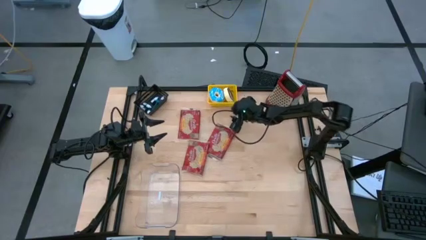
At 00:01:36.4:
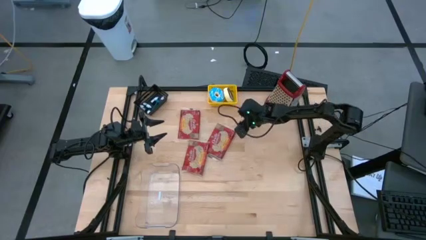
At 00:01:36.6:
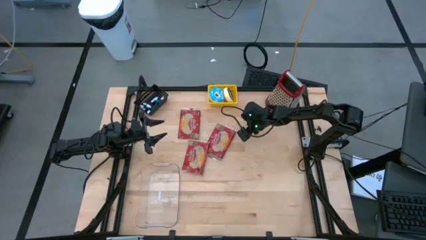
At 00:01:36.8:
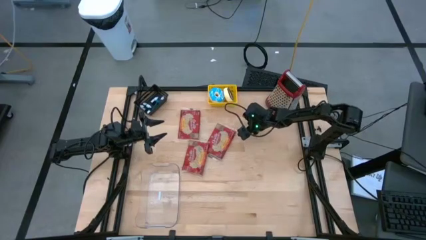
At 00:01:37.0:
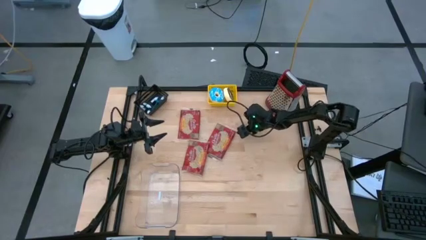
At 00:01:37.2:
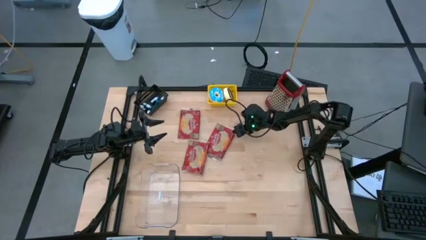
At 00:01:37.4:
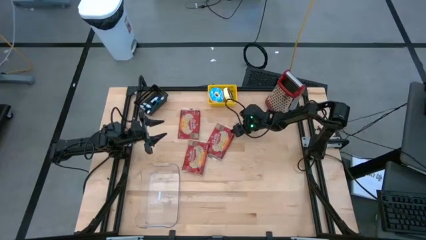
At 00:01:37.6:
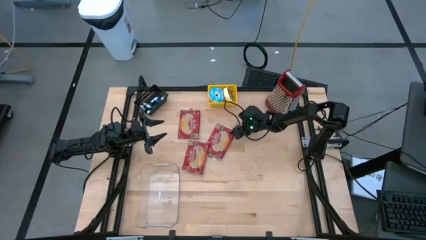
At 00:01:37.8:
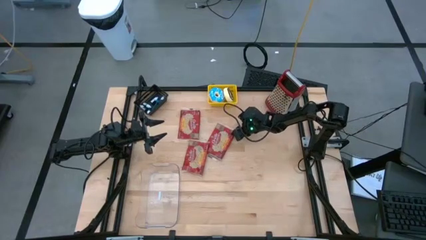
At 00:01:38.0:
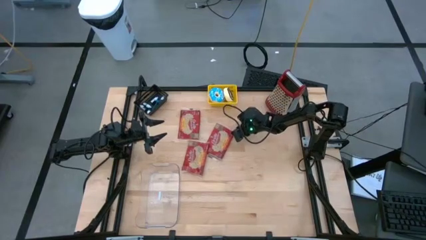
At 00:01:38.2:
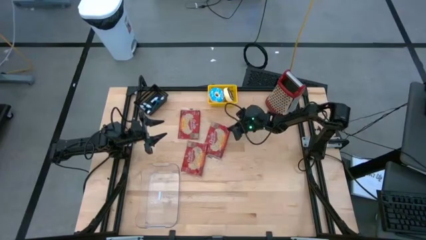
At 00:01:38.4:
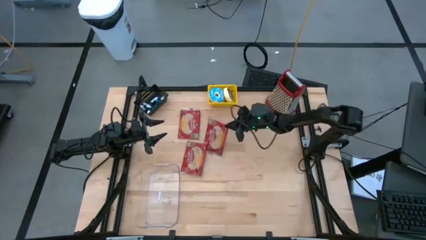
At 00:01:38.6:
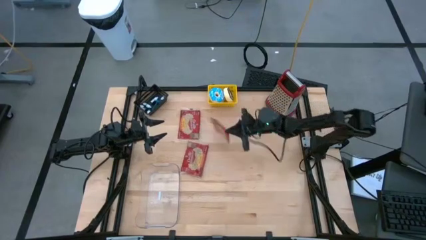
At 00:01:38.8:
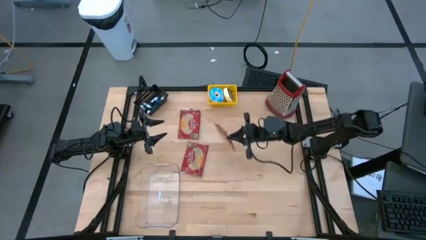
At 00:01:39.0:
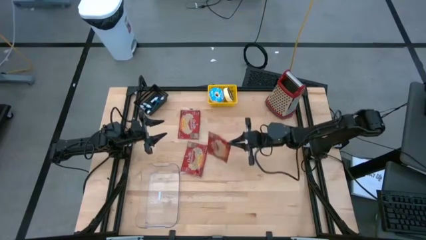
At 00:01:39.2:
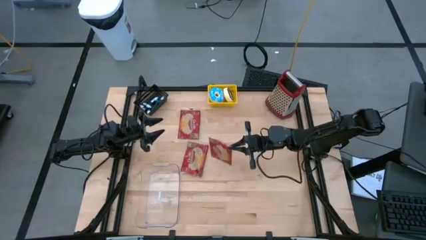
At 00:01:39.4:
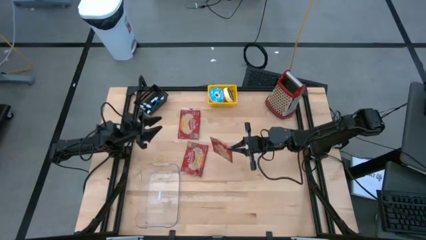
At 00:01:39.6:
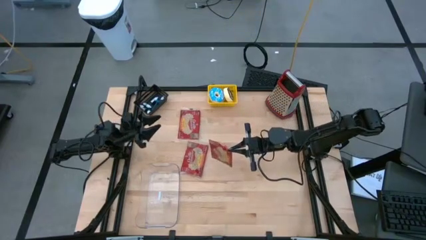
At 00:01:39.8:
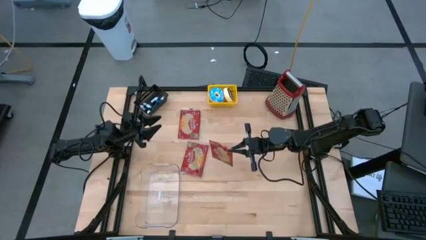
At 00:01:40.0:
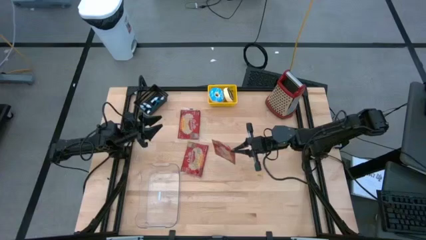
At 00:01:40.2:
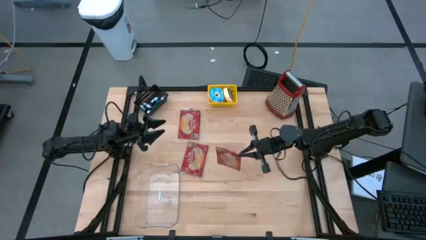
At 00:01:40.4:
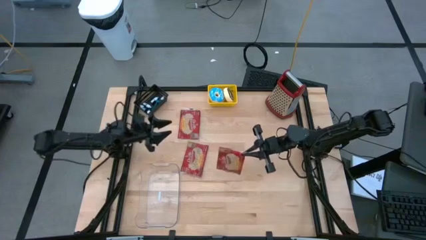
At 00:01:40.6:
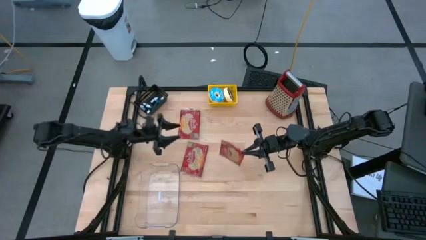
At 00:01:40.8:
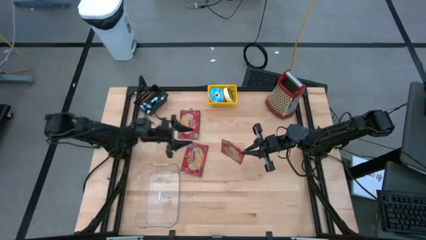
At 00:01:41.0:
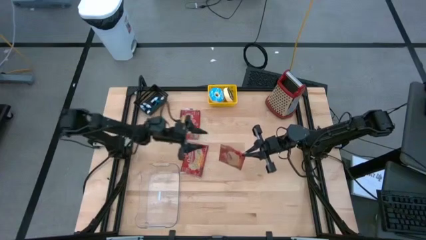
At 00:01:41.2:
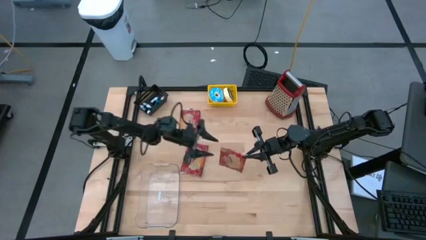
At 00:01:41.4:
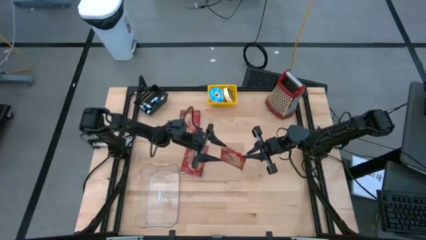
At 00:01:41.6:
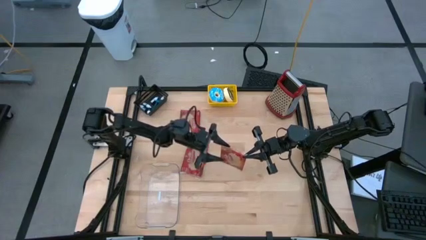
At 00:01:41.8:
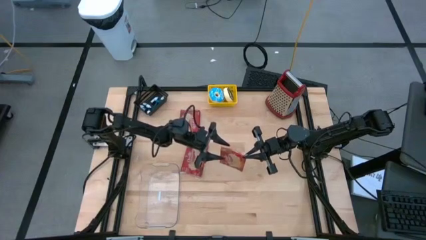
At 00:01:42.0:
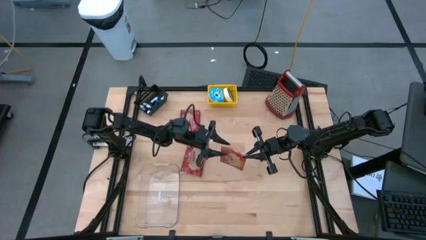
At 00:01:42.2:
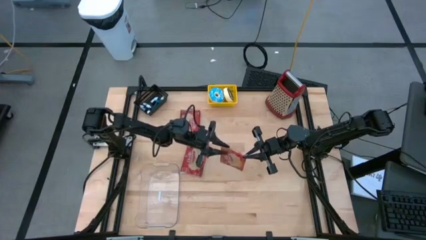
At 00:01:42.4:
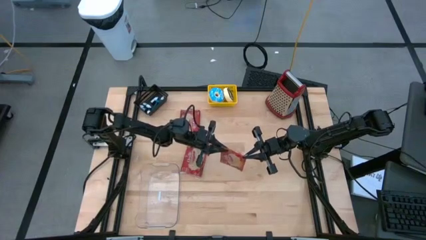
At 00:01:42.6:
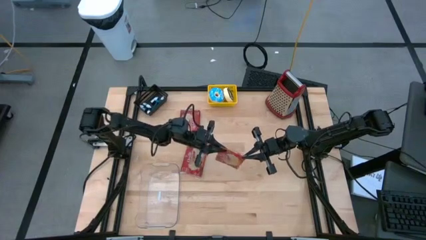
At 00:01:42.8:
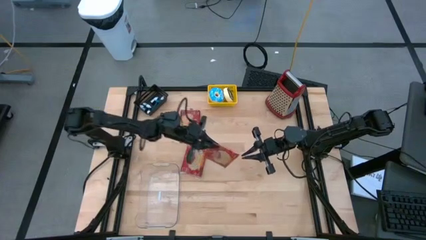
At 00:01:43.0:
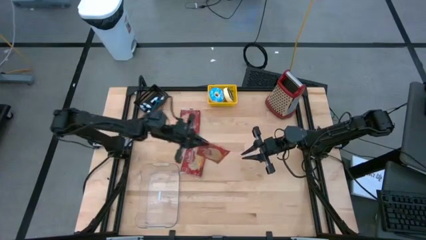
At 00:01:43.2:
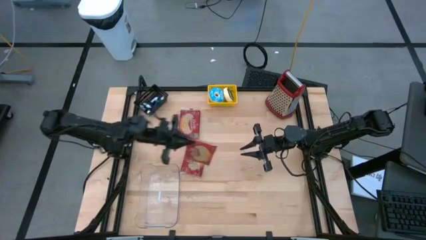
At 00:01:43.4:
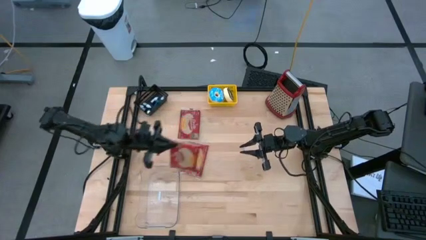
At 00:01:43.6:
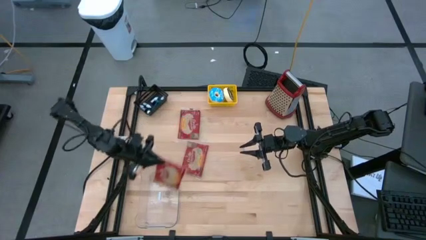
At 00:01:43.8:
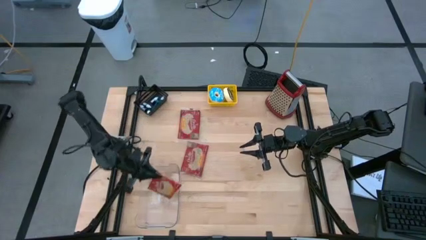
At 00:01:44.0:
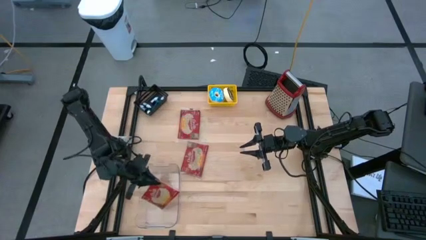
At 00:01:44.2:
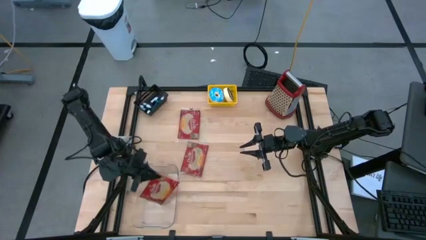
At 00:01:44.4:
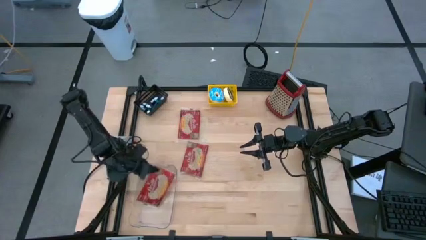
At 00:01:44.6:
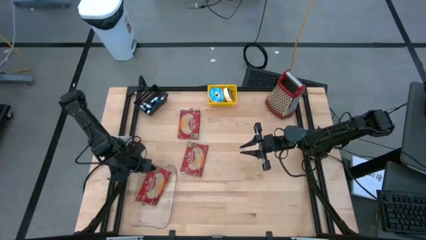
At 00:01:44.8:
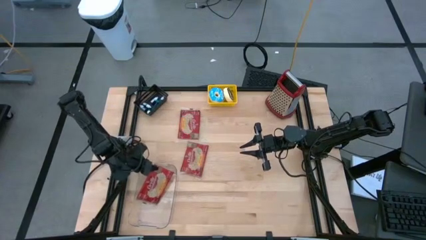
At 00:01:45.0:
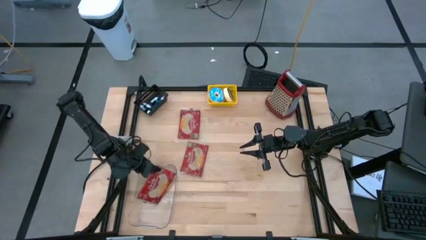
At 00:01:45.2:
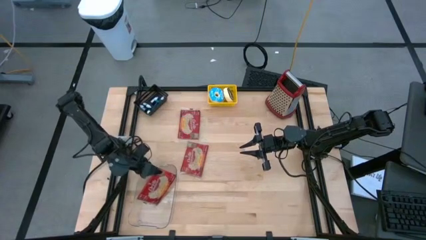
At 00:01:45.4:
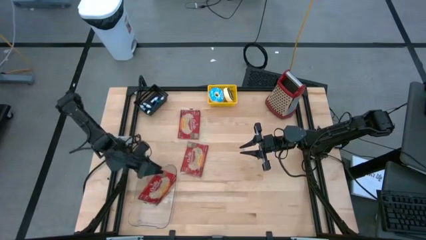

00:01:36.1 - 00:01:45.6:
Put the middle right red popcorn bag into the transparent bin

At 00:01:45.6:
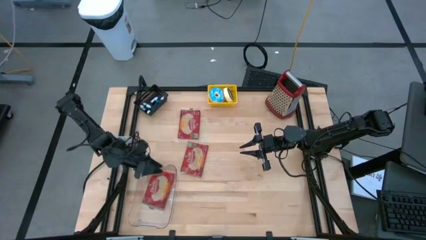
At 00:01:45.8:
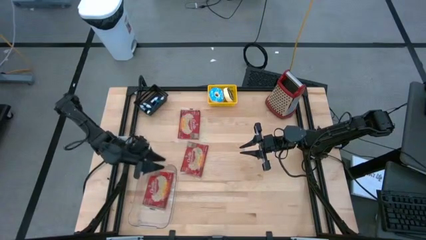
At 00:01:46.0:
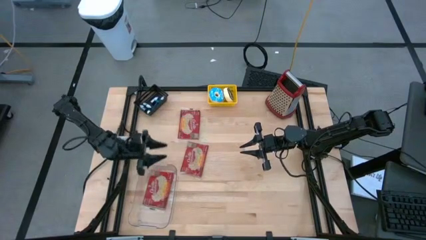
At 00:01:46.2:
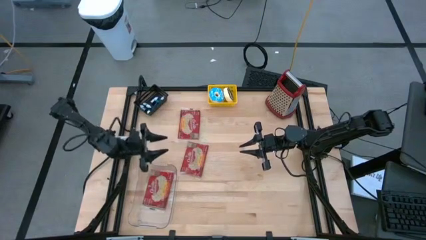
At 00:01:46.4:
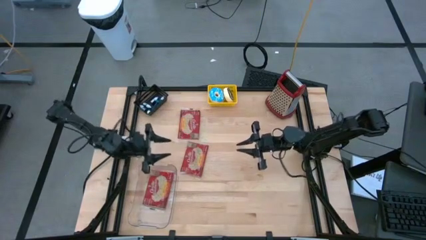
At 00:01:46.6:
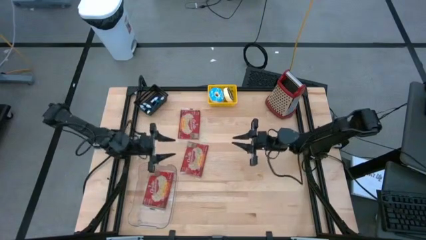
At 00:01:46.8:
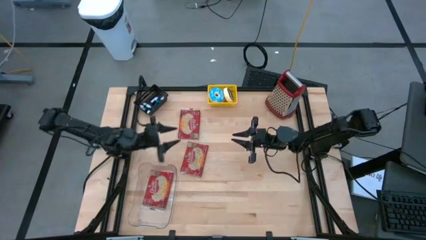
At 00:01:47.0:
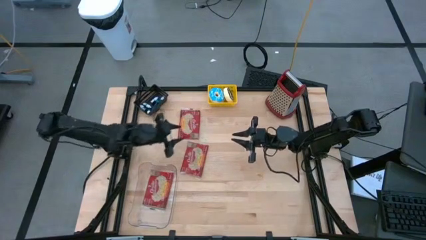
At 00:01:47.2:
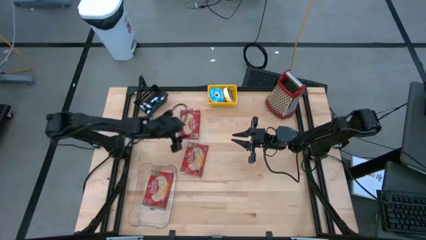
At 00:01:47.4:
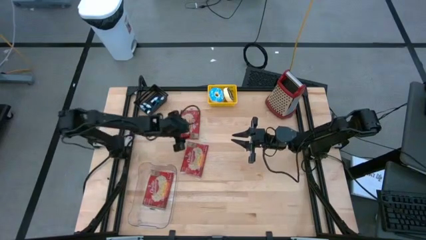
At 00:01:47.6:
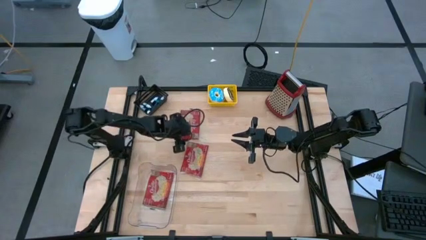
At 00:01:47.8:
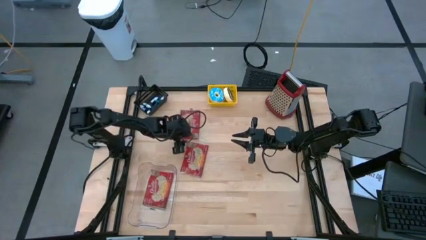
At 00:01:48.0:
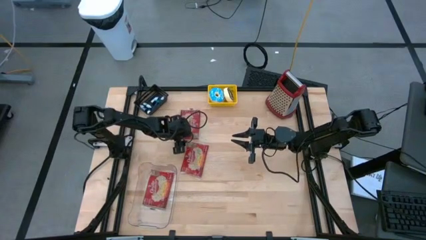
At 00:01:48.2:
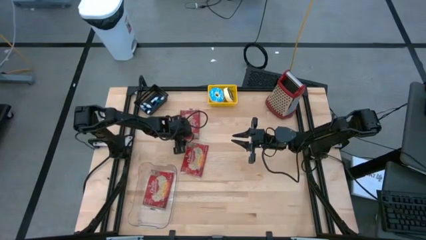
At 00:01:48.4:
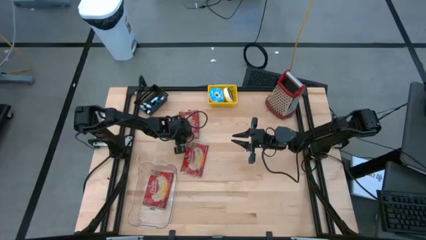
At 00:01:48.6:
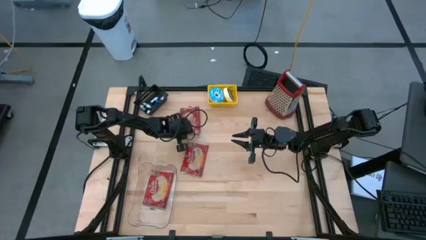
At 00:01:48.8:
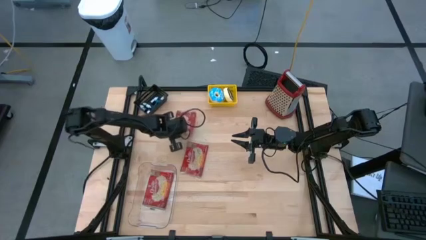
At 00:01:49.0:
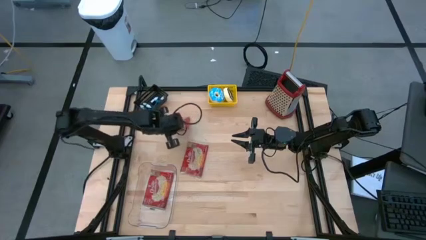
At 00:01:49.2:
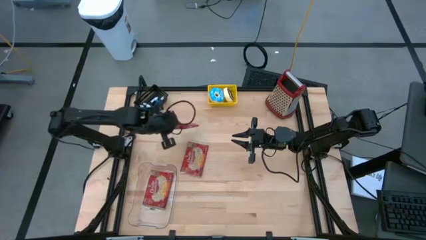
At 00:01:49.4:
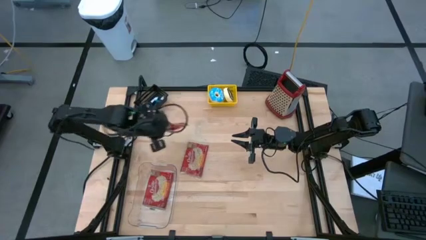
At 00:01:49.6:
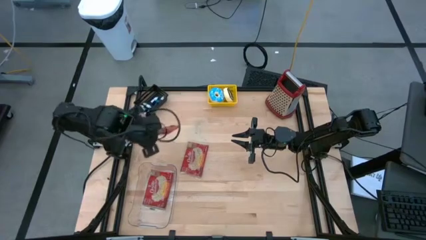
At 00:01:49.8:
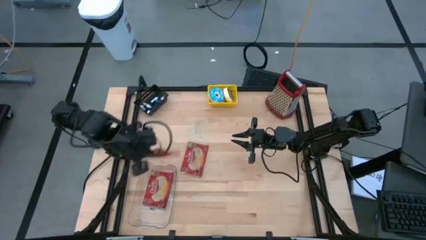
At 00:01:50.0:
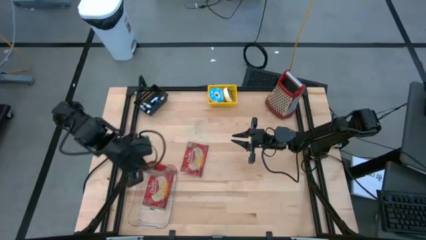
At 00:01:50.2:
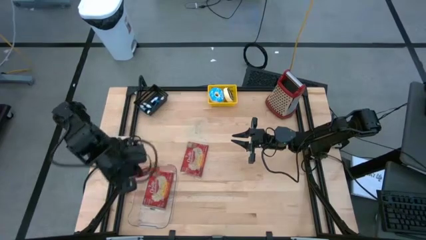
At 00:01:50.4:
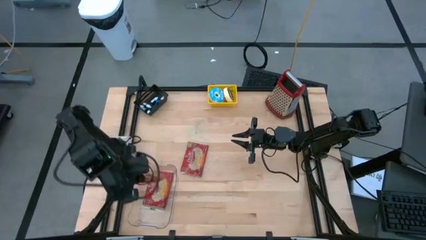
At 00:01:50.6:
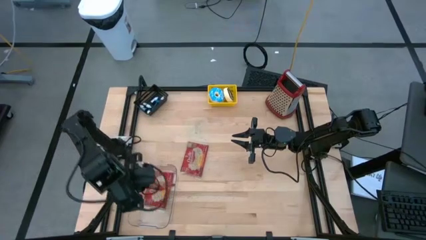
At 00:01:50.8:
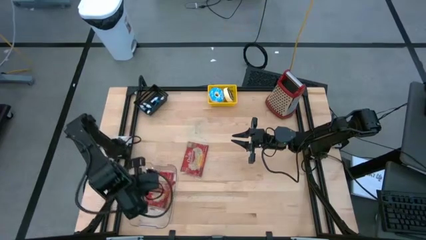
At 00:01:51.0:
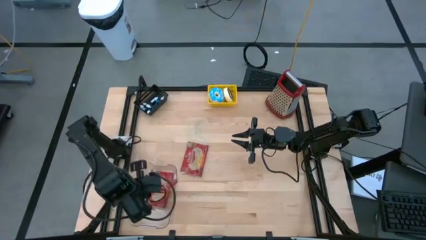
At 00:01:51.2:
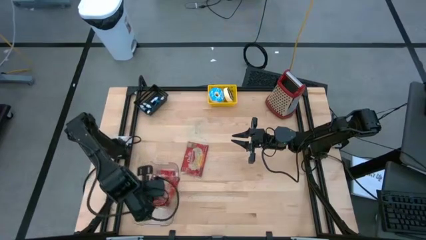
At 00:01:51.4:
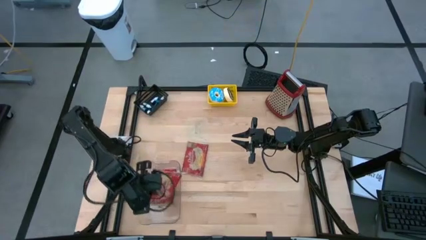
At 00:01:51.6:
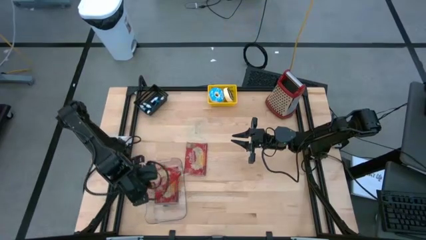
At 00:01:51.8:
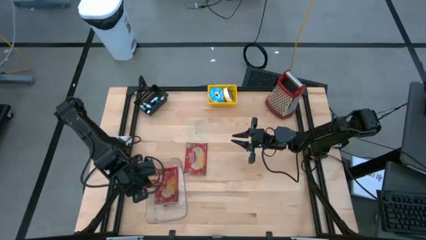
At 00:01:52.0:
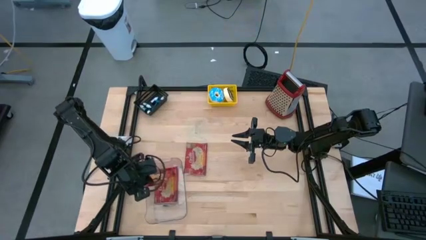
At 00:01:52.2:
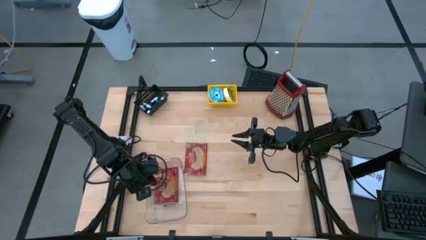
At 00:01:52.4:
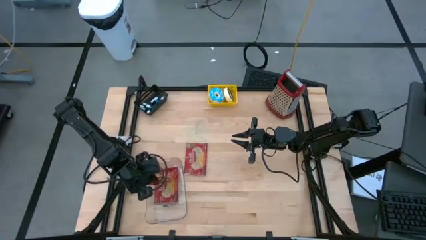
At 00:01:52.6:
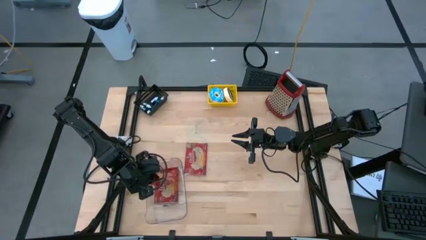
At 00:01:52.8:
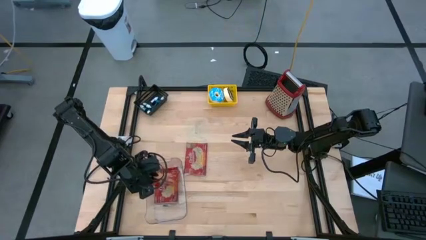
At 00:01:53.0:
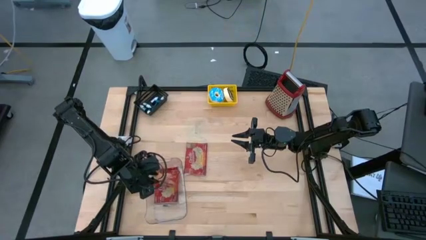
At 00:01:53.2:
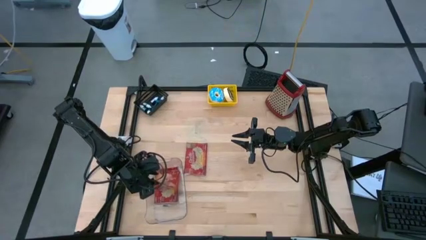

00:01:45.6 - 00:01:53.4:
Put the top red popcorn bag into the transparent bin
